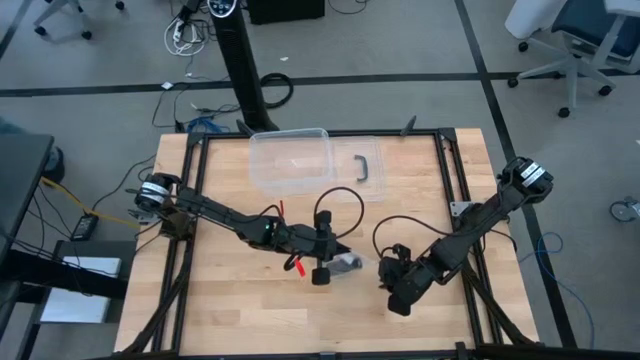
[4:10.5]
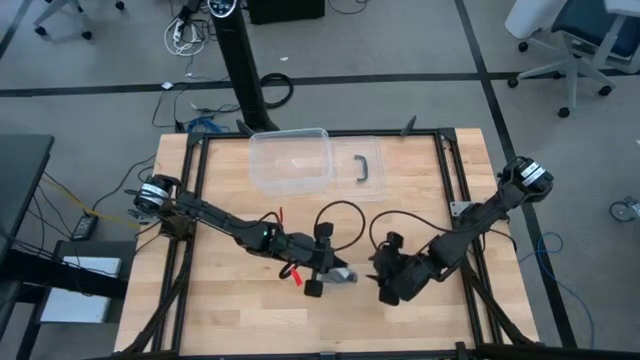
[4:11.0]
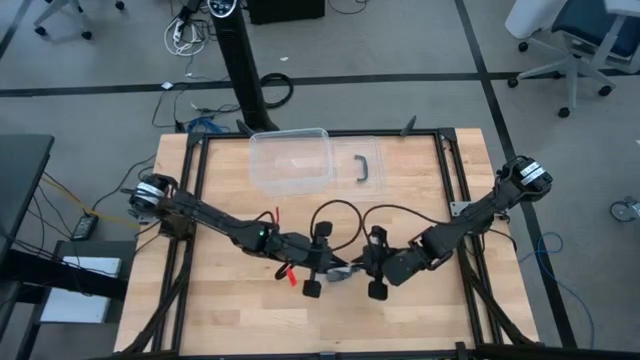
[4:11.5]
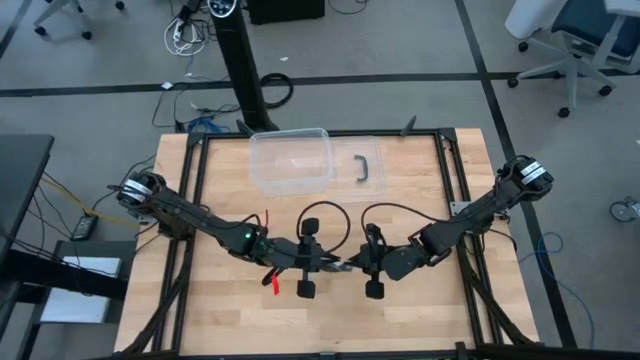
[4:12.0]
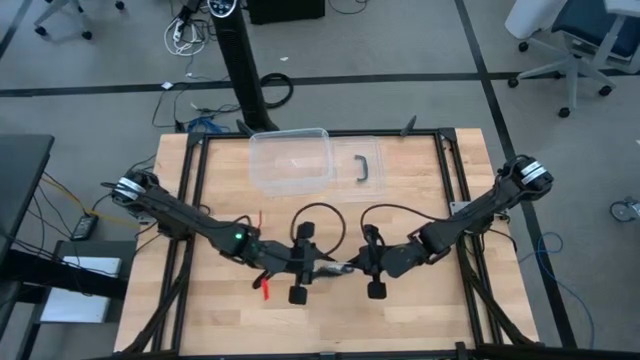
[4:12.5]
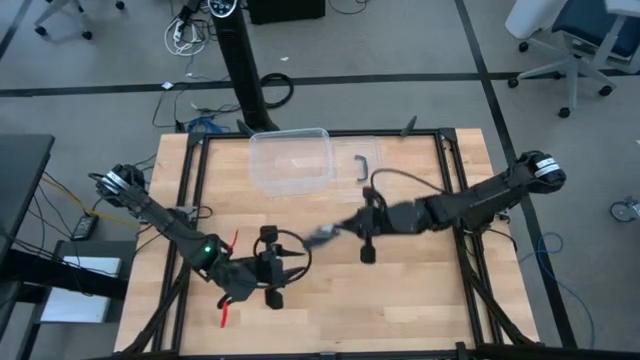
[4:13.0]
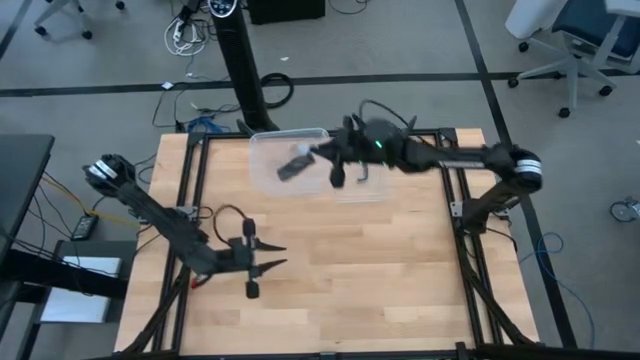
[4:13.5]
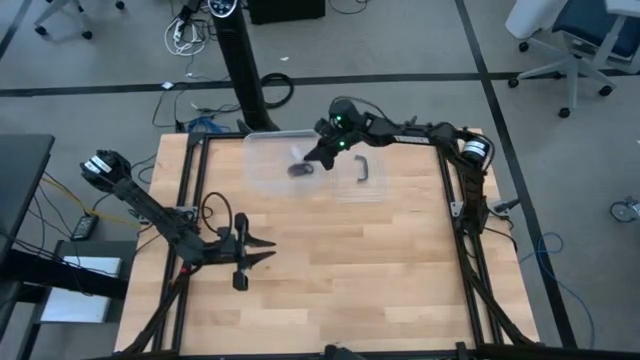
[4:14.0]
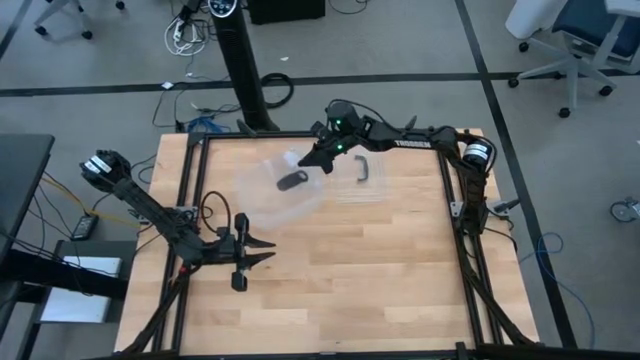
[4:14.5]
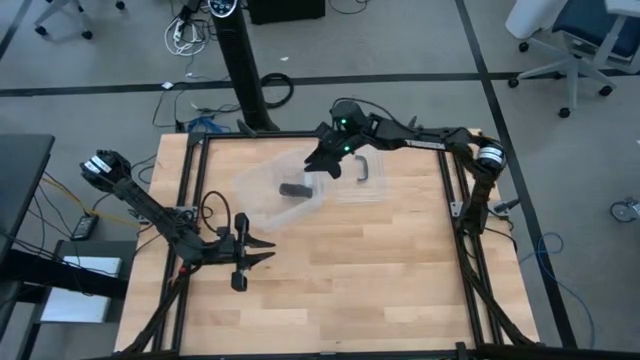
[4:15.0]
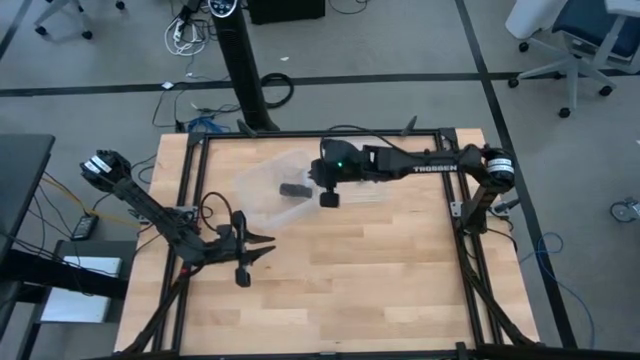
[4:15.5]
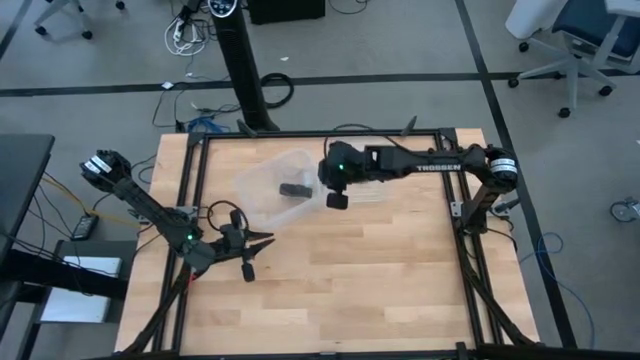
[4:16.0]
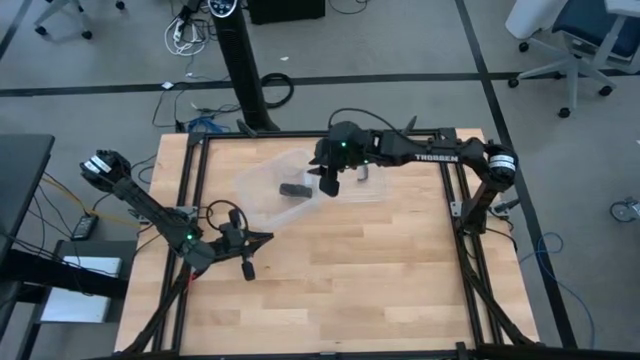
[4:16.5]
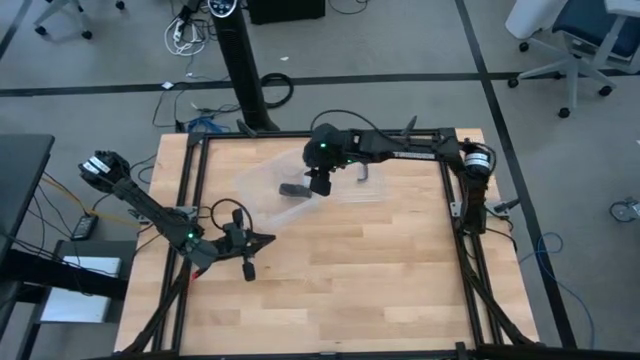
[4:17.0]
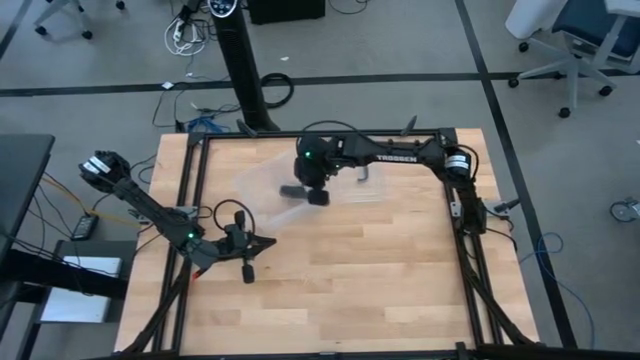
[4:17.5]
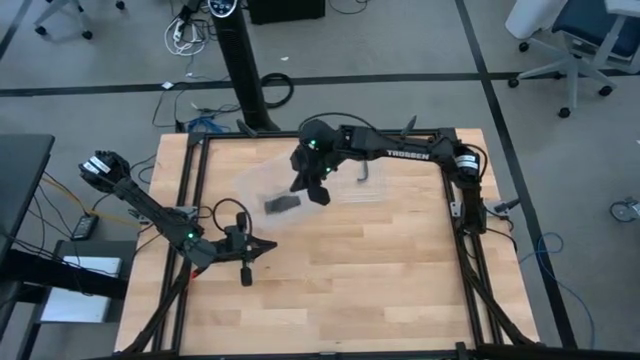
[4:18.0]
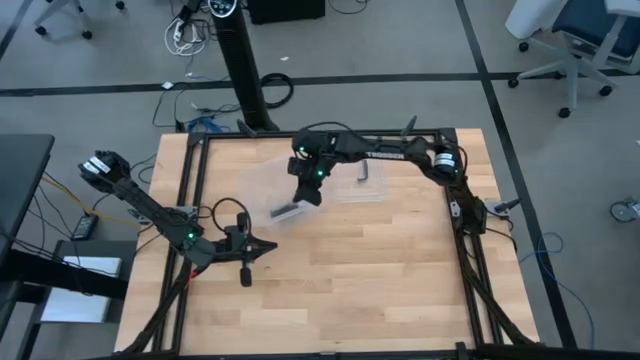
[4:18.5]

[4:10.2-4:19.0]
Task: Roll bandage
Put the transparent zip bag into the transparent bin

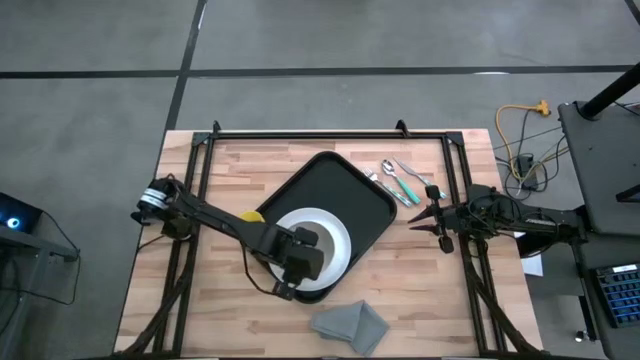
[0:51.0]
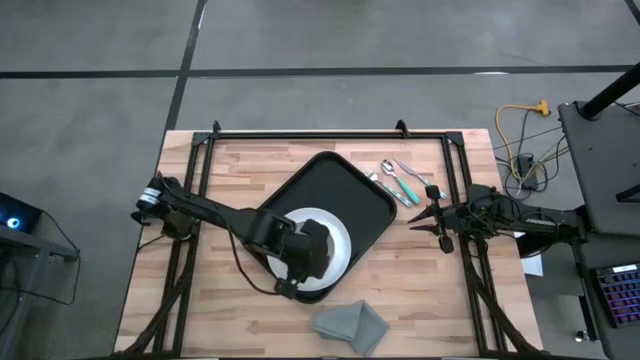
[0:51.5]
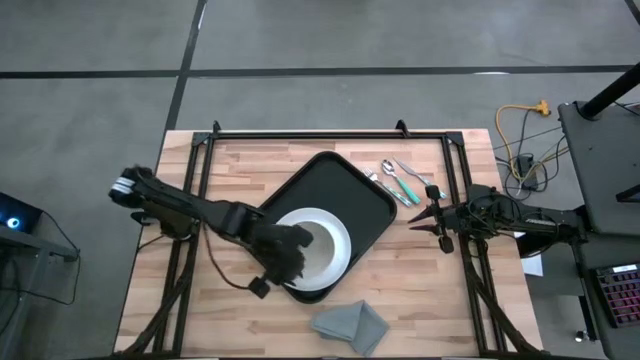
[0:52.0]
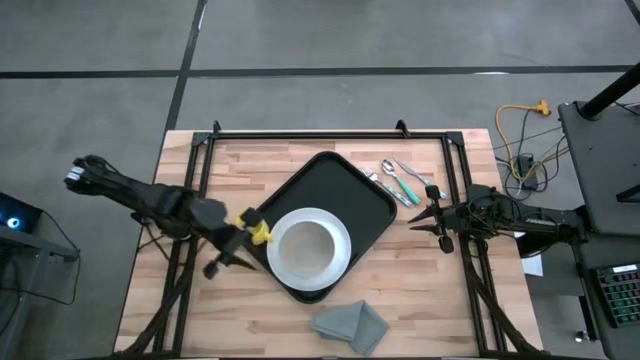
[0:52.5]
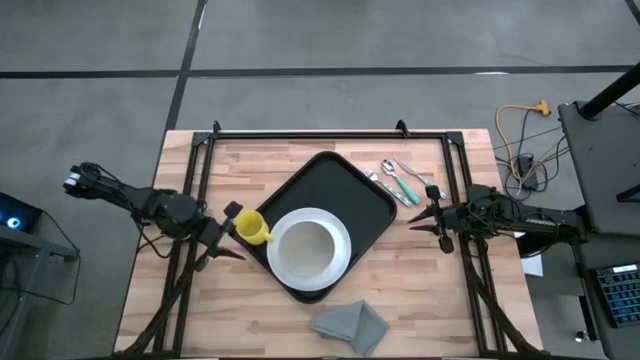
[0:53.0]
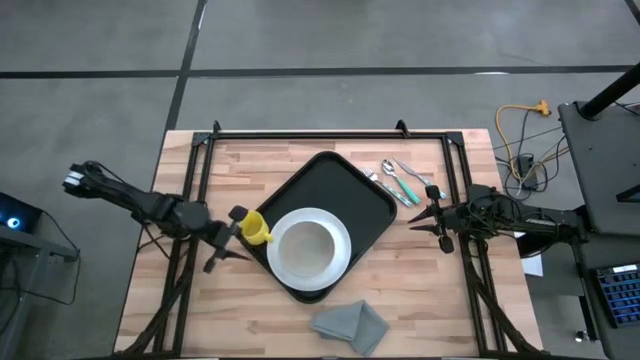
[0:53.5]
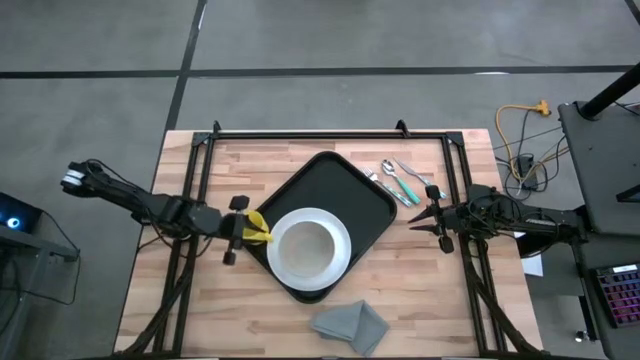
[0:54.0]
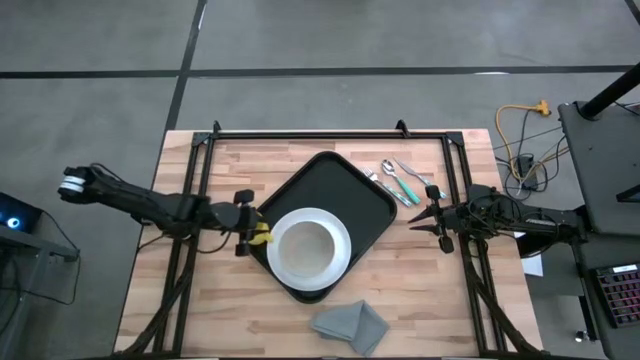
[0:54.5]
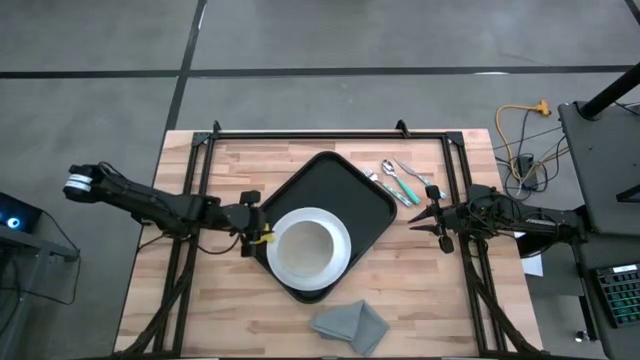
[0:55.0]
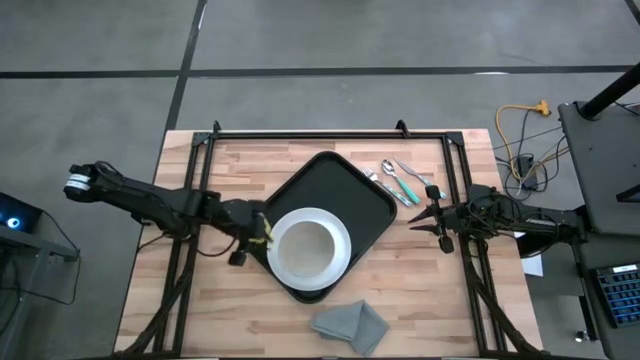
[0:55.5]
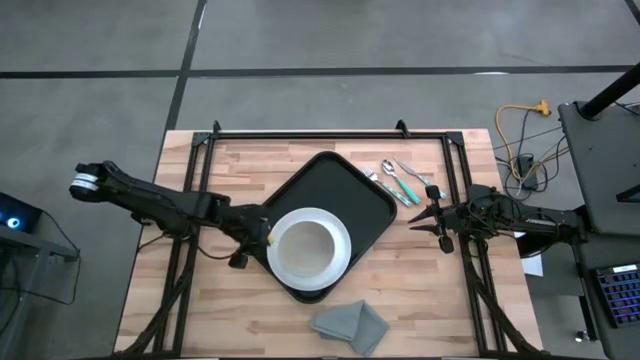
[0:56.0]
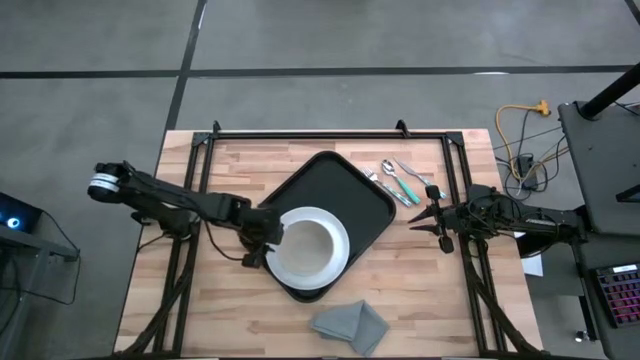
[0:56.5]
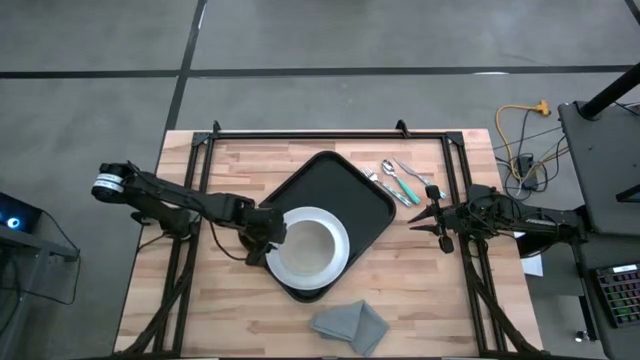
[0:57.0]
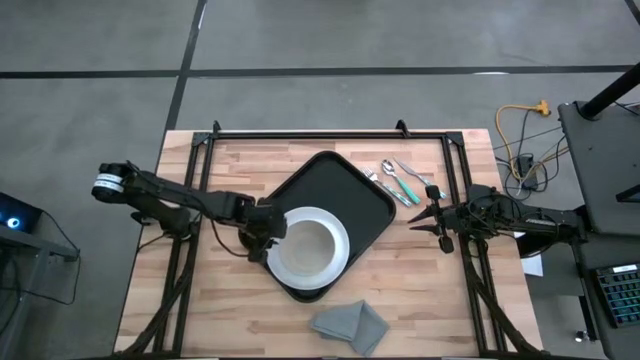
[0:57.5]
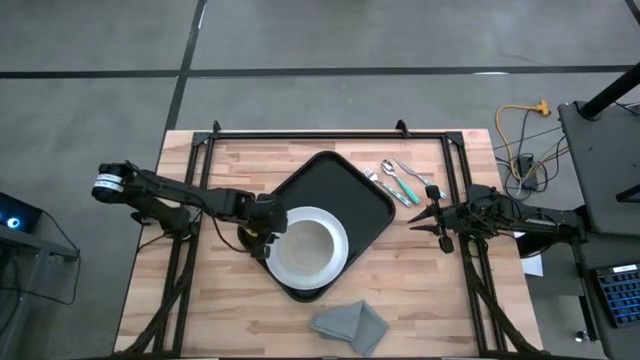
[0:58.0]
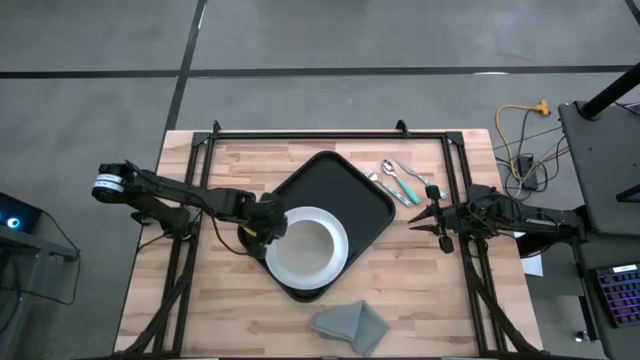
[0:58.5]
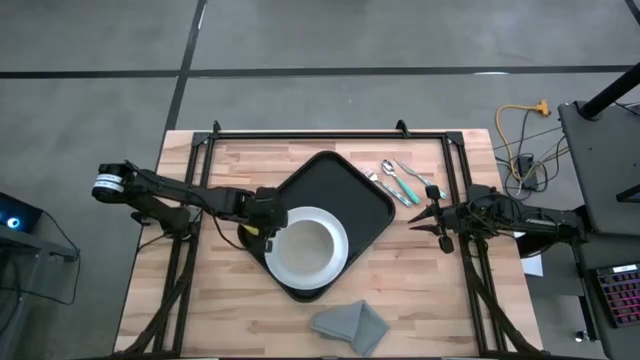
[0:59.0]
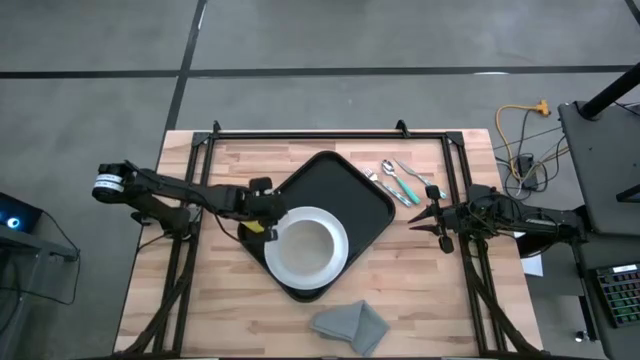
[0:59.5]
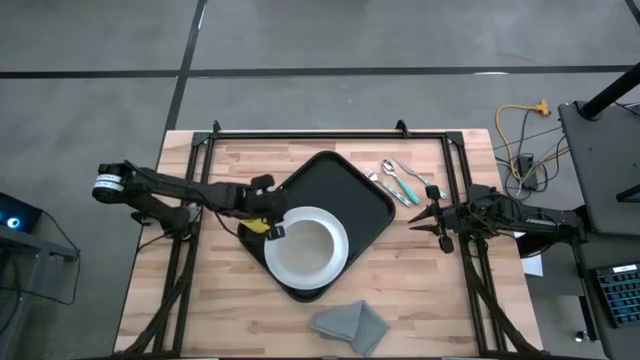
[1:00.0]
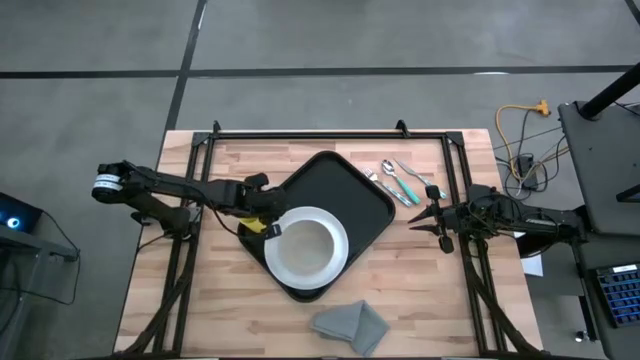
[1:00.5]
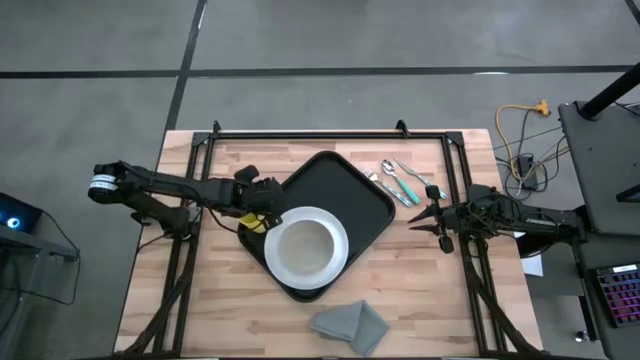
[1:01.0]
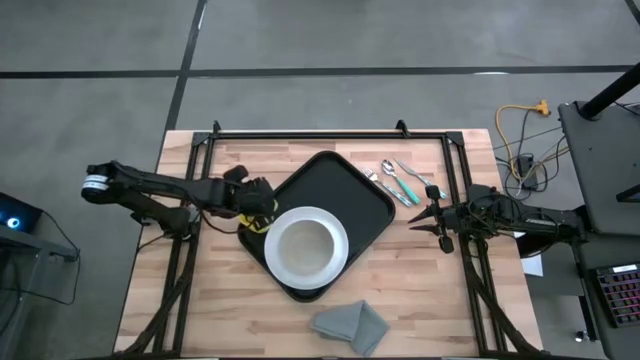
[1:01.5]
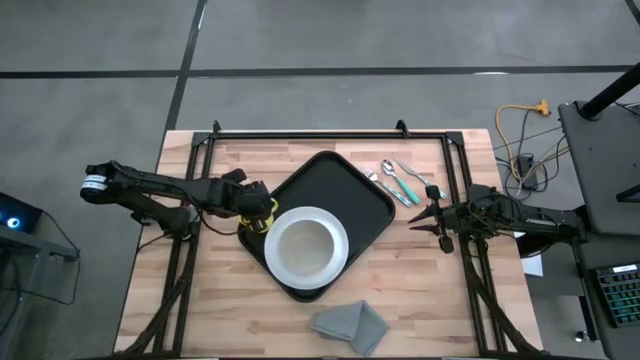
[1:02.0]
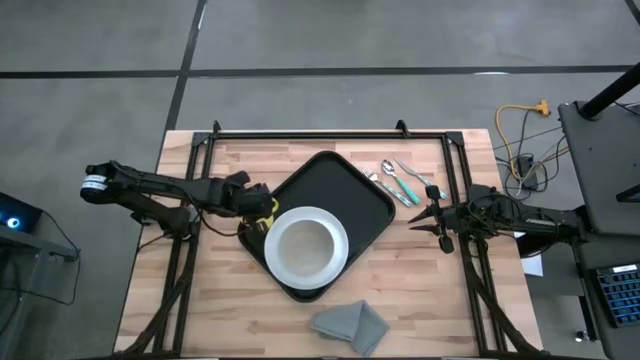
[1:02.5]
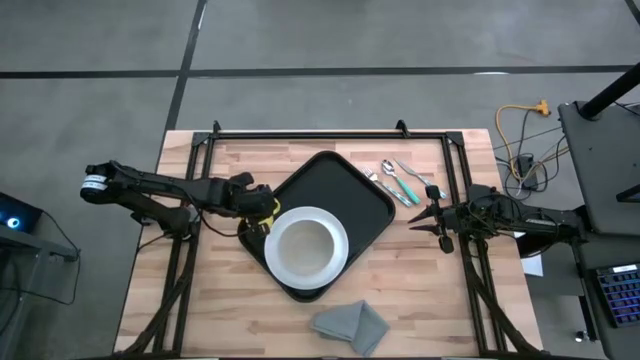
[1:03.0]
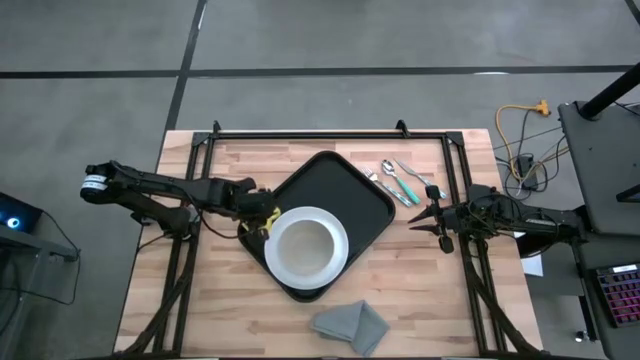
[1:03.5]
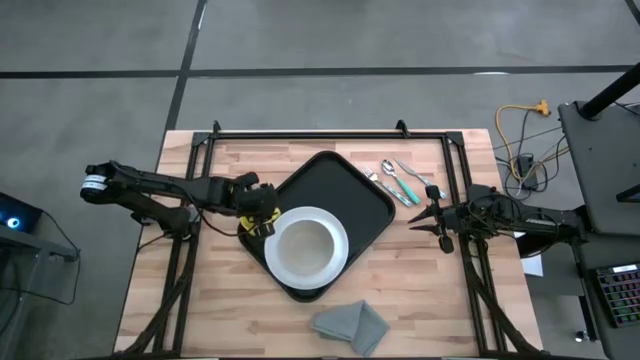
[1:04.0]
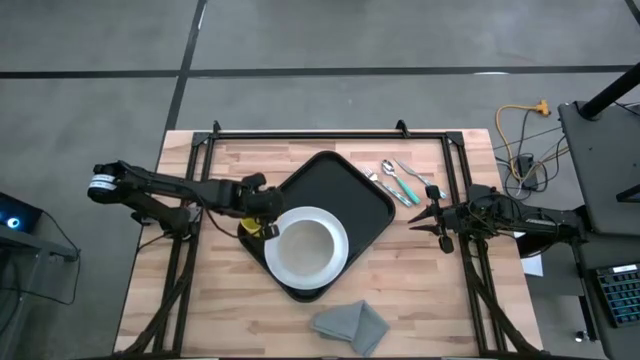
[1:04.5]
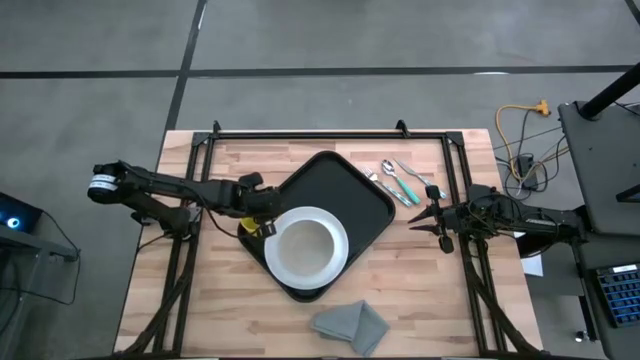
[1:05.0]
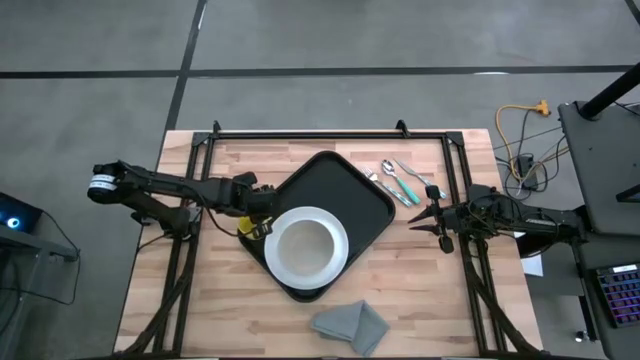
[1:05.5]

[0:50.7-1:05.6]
Task: Set up tray
Adjust the yellow mug on the black serving tray
